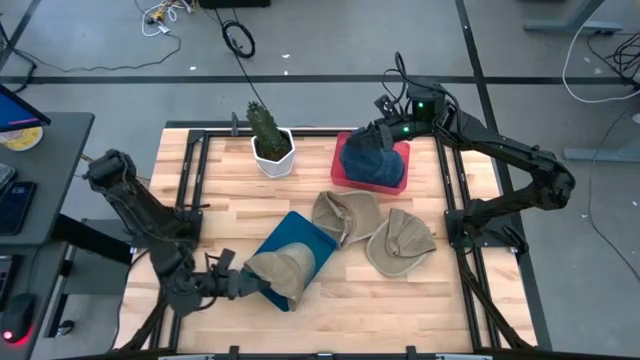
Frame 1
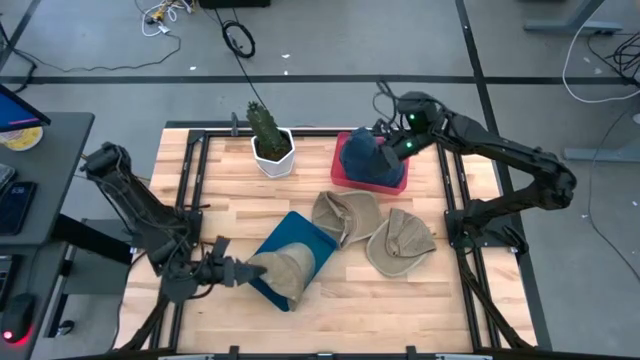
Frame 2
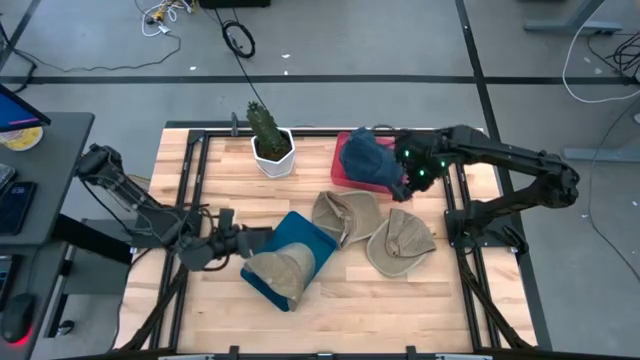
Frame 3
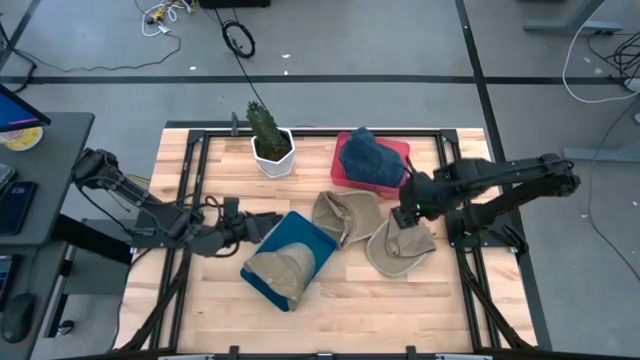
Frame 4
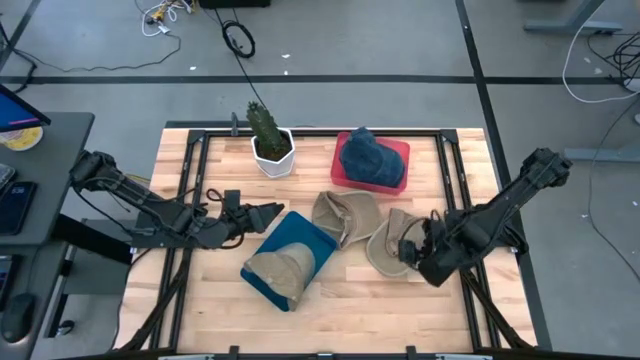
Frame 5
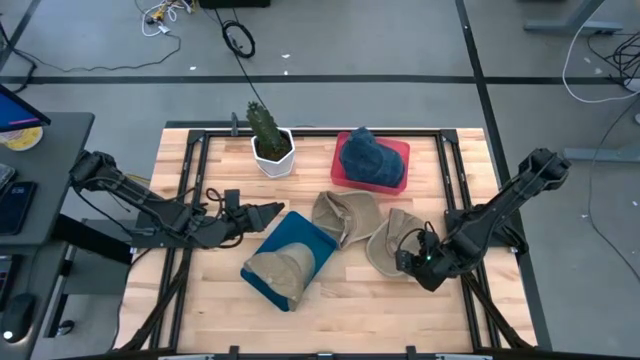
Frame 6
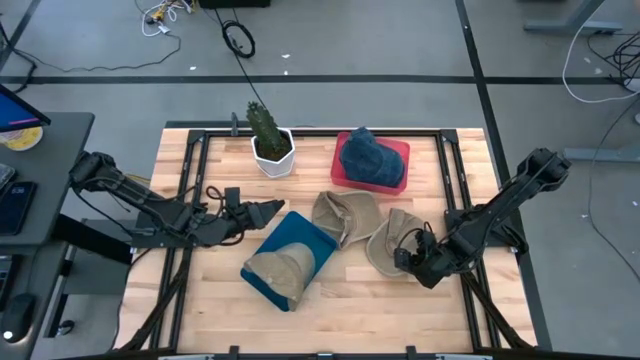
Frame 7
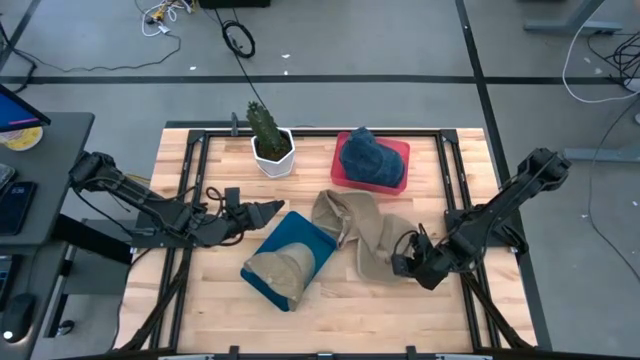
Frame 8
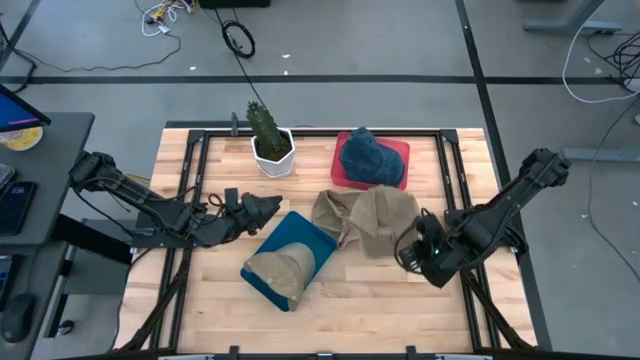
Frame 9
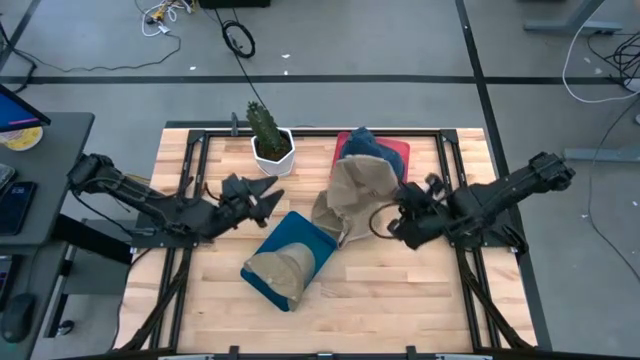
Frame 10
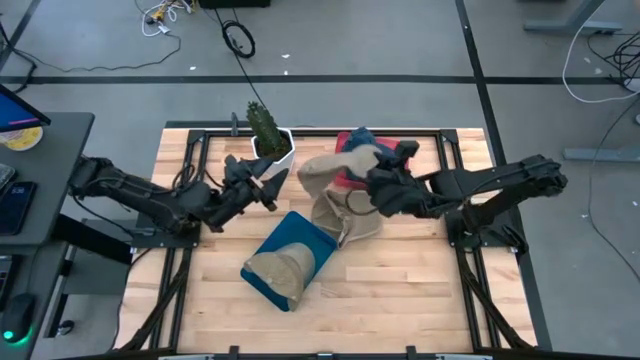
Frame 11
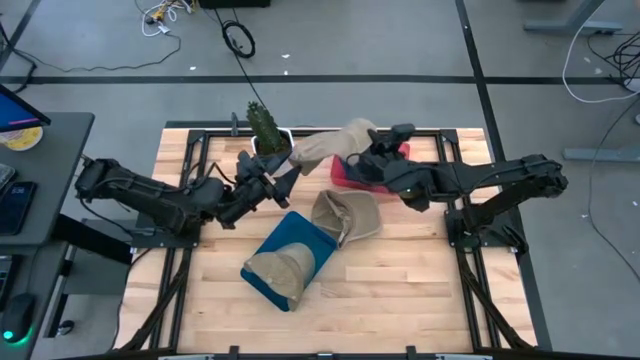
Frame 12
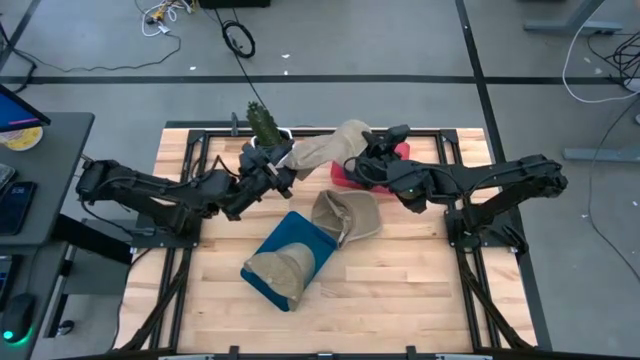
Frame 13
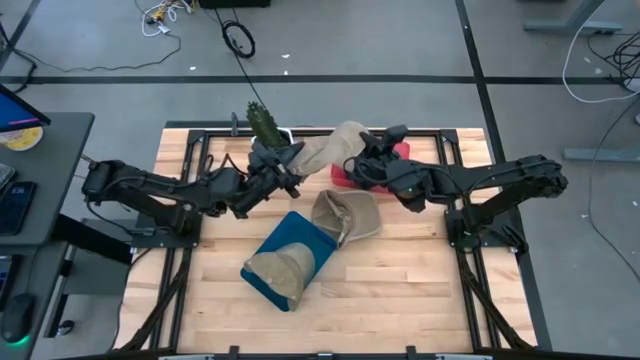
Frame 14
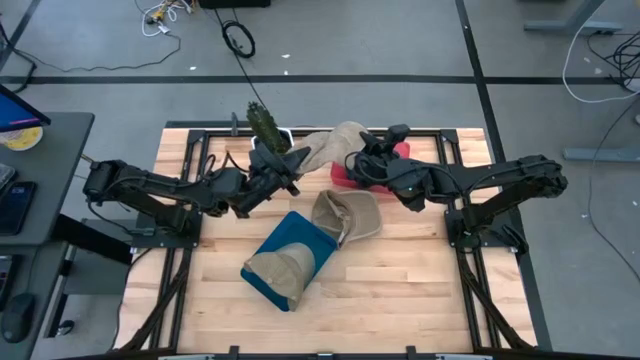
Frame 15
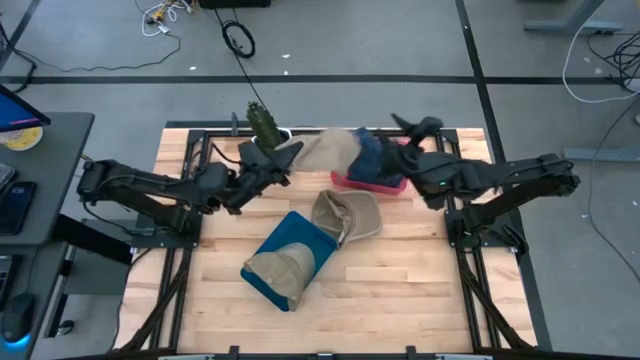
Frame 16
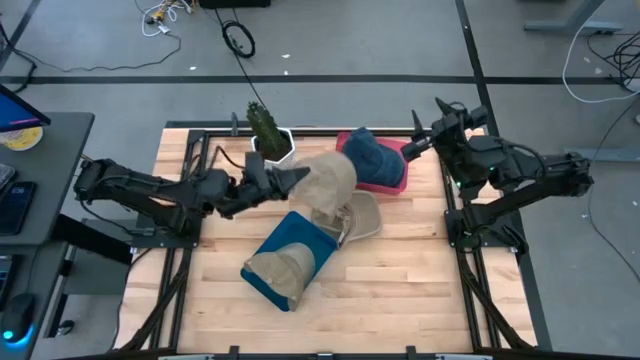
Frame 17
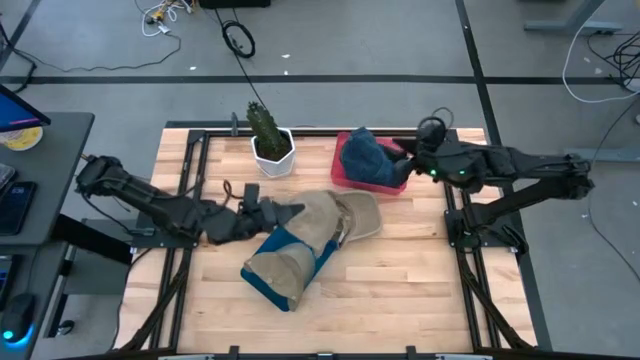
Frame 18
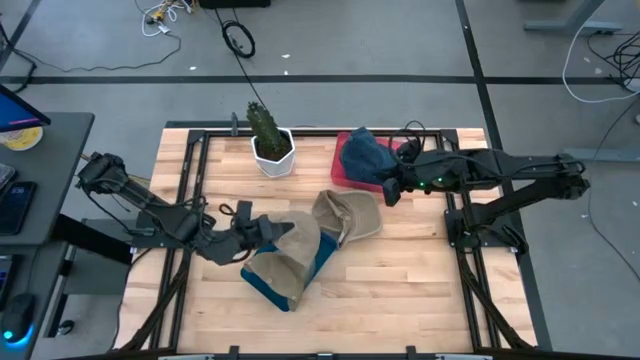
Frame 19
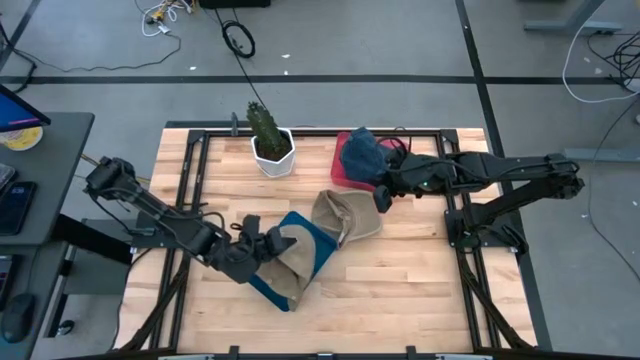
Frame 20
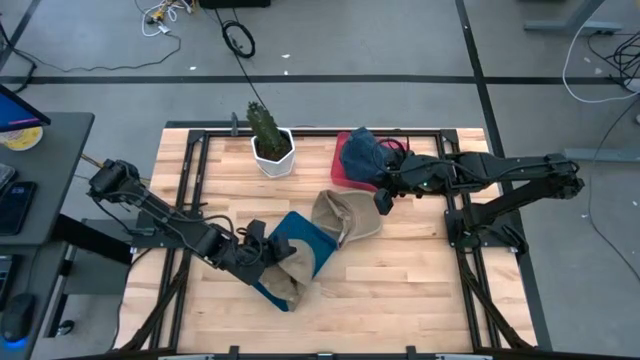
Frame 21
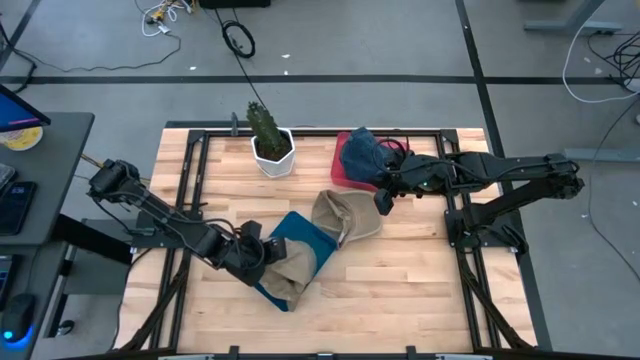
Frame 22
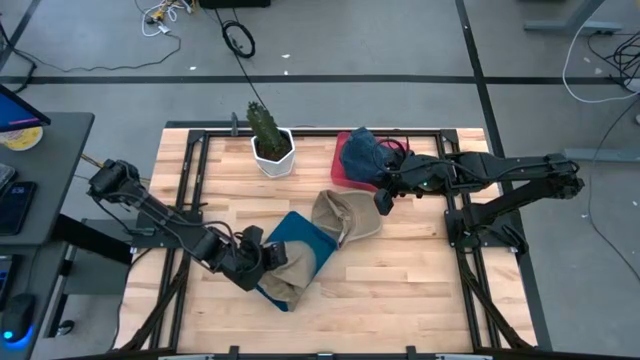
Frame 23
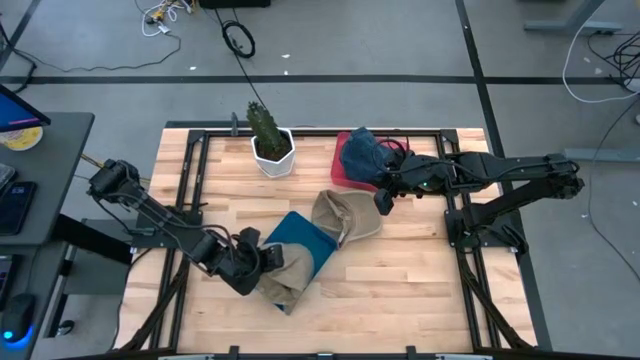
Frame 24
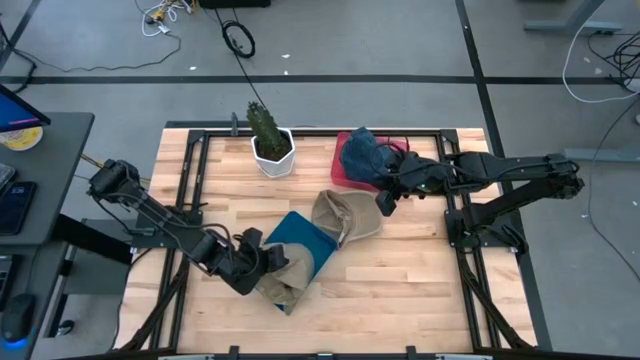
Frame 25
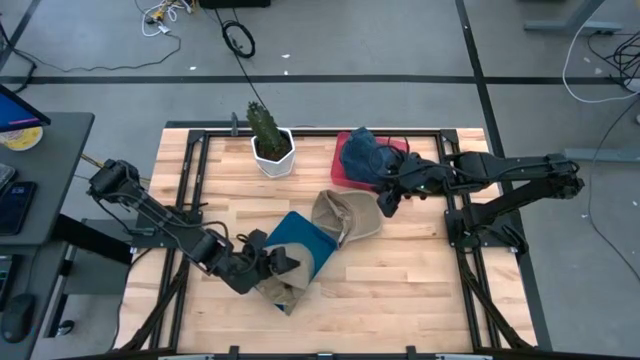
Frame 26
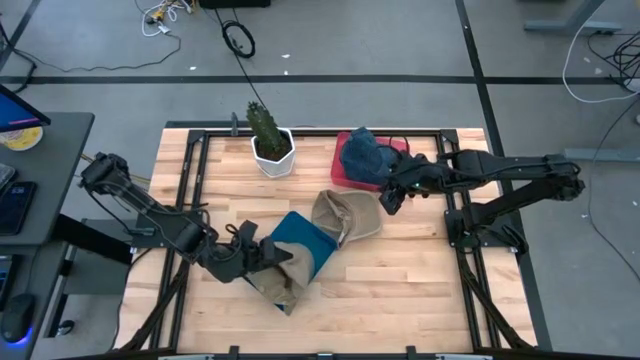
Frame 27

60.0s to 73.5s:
Task: Pick & Place hat
Put the right brown cap into the blue bin
